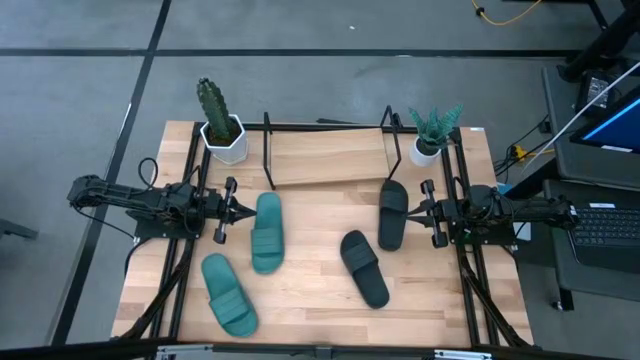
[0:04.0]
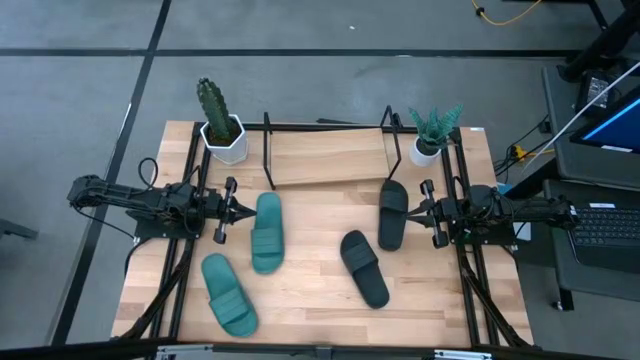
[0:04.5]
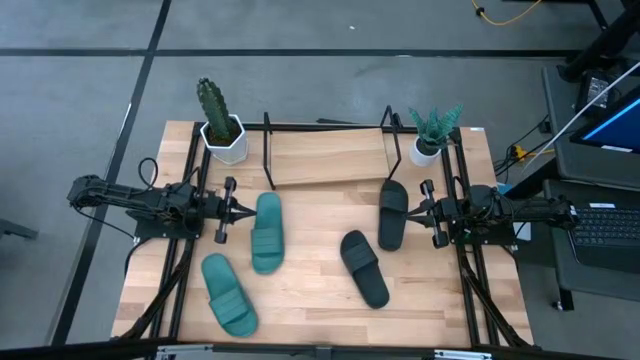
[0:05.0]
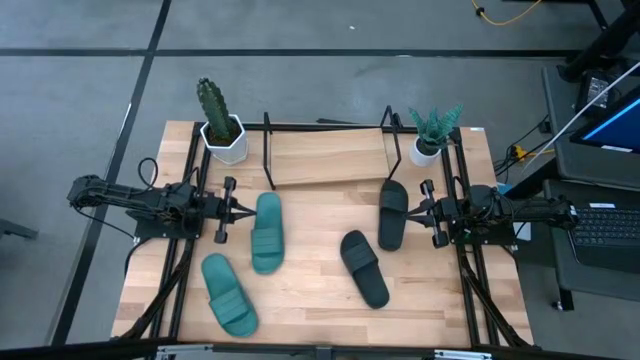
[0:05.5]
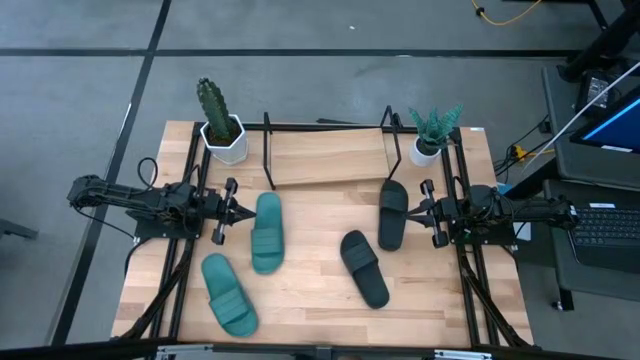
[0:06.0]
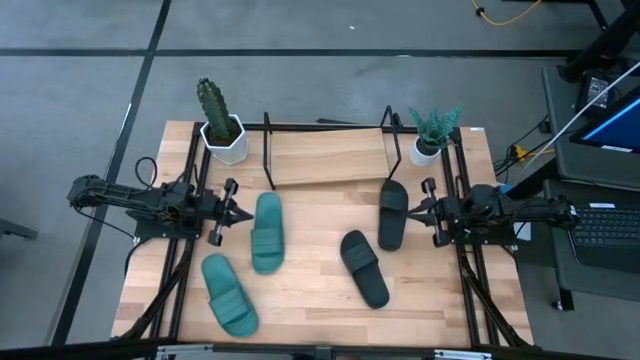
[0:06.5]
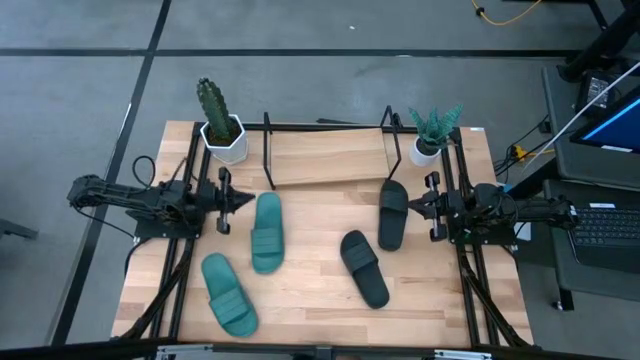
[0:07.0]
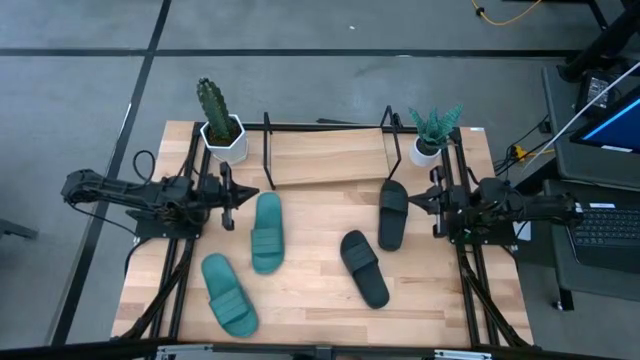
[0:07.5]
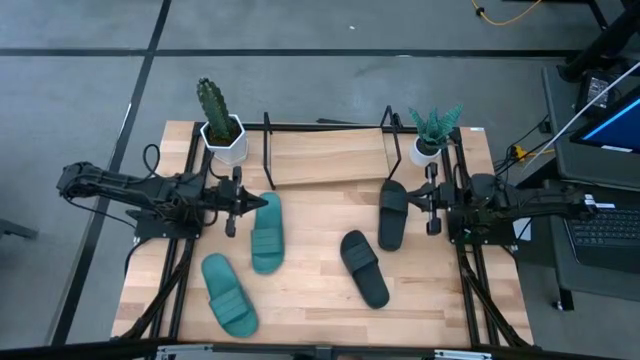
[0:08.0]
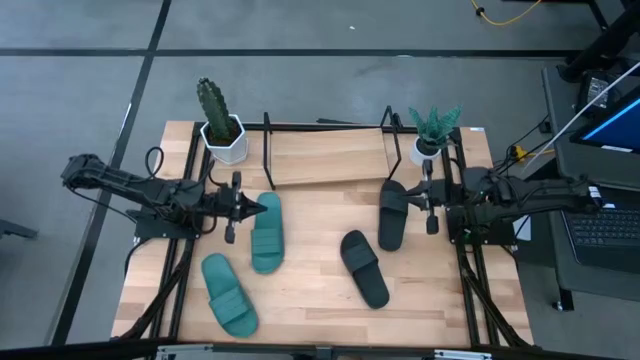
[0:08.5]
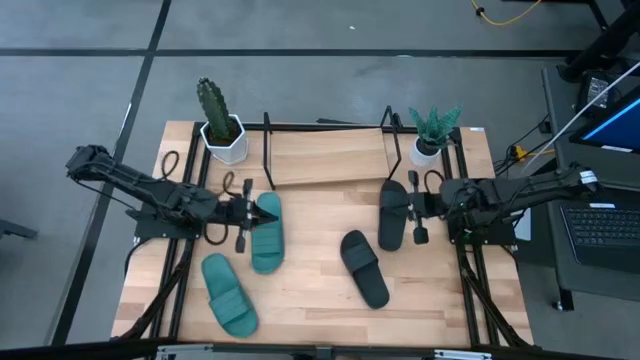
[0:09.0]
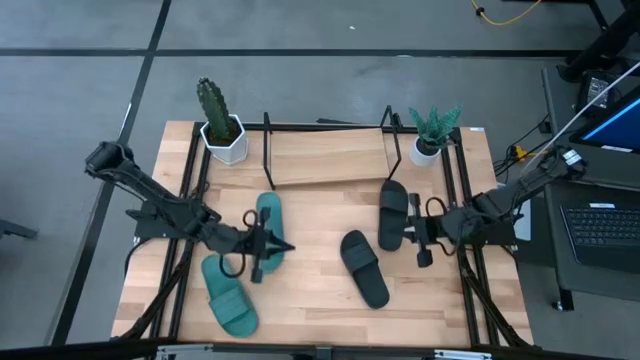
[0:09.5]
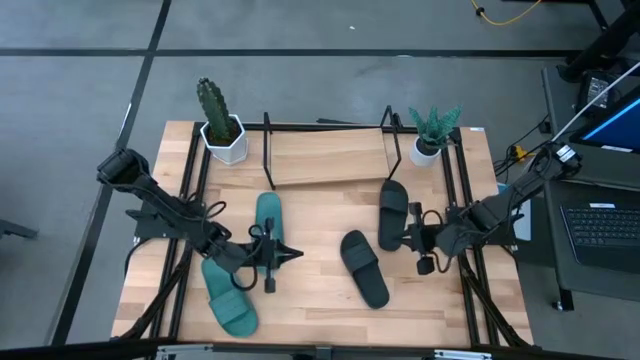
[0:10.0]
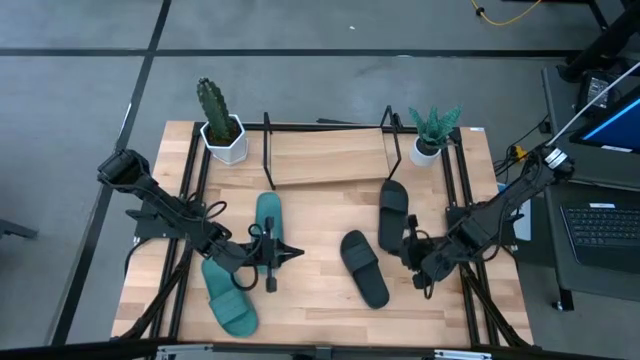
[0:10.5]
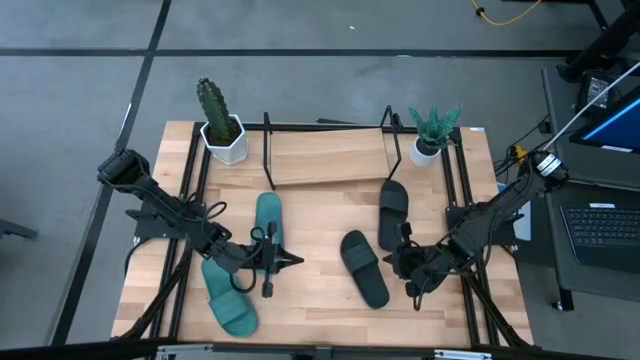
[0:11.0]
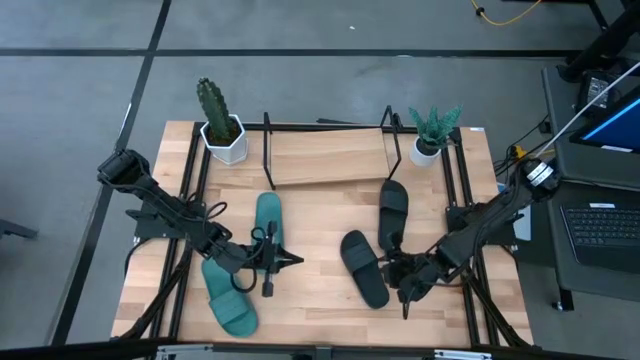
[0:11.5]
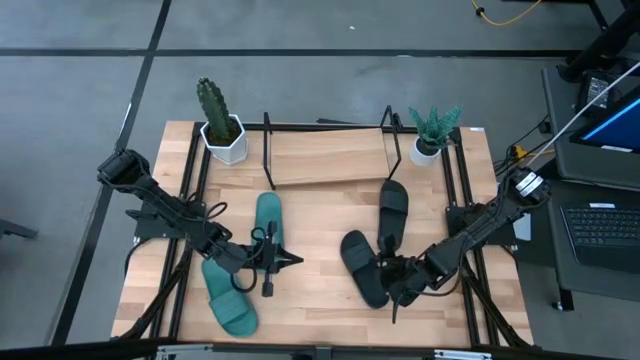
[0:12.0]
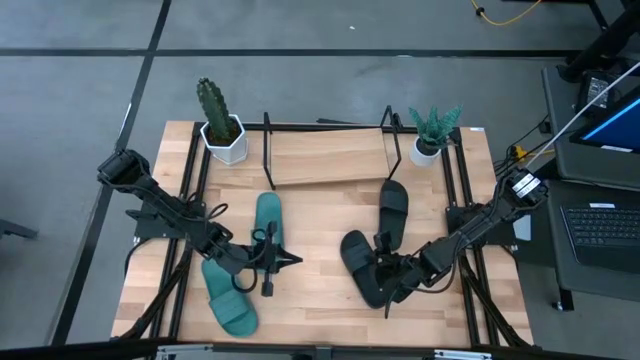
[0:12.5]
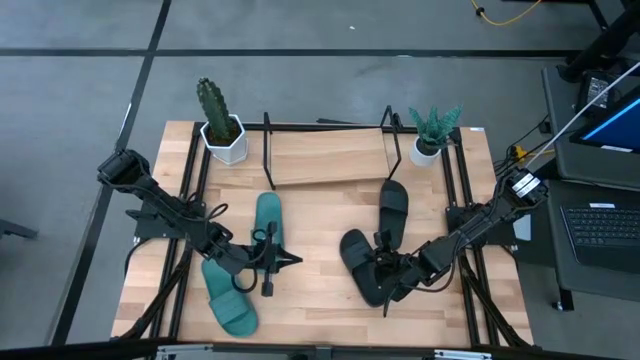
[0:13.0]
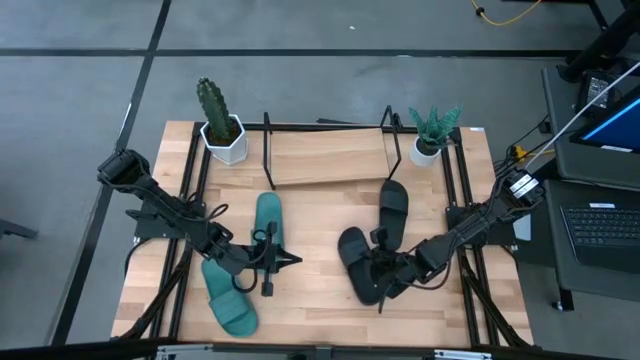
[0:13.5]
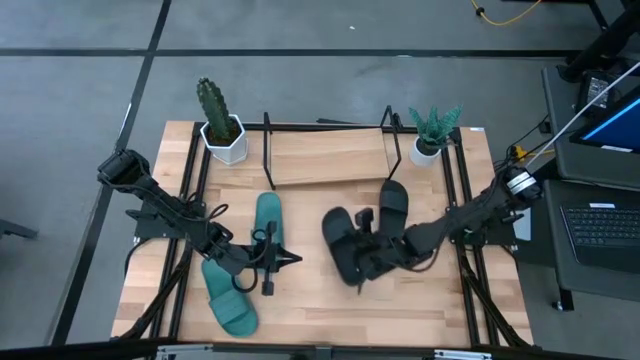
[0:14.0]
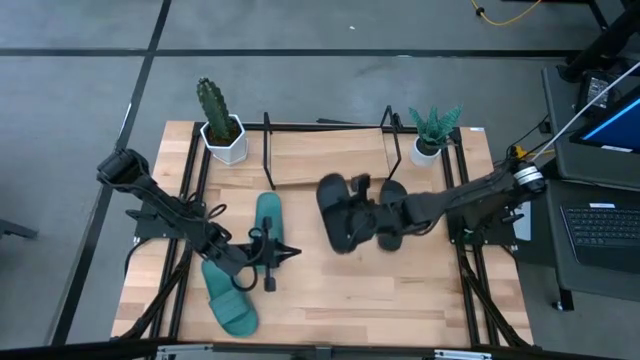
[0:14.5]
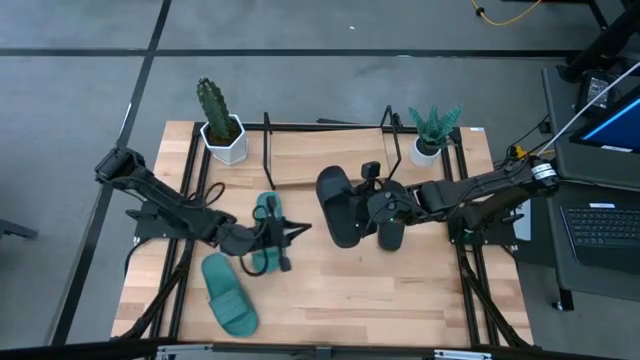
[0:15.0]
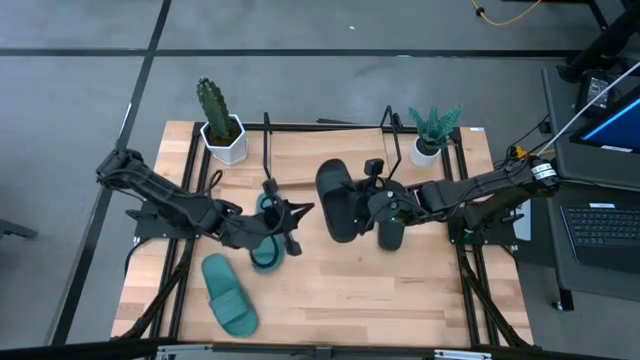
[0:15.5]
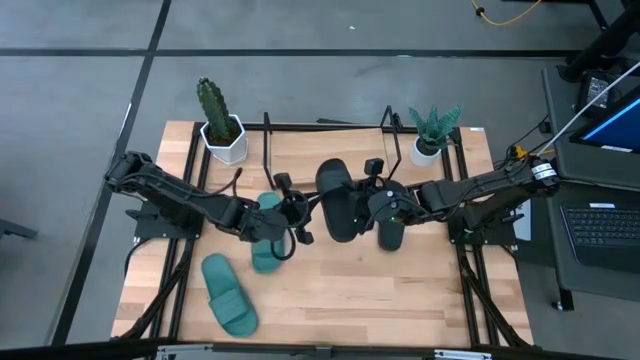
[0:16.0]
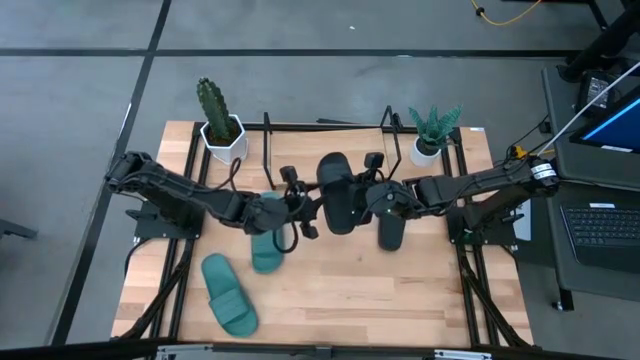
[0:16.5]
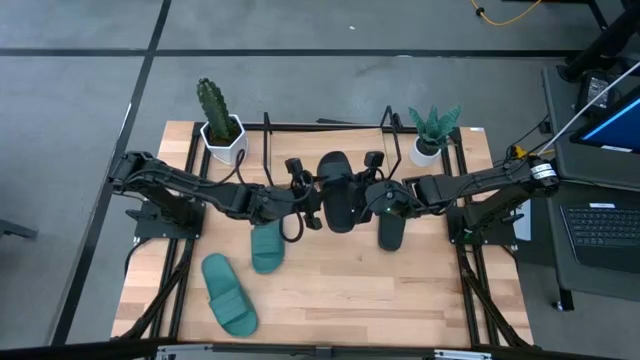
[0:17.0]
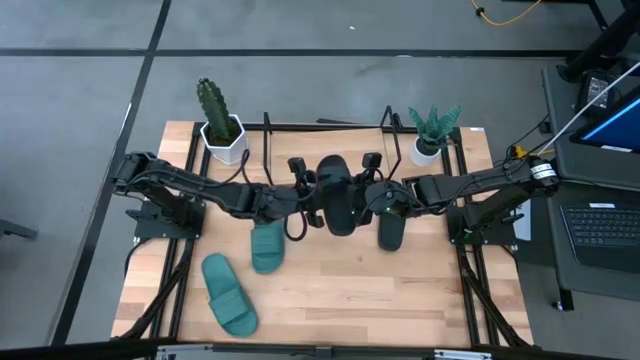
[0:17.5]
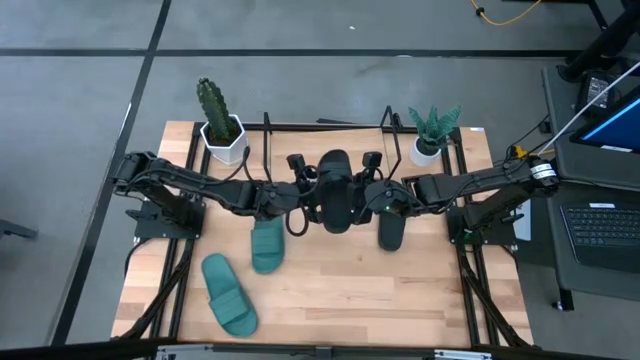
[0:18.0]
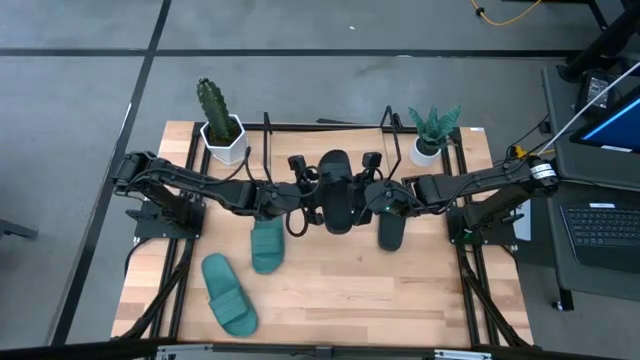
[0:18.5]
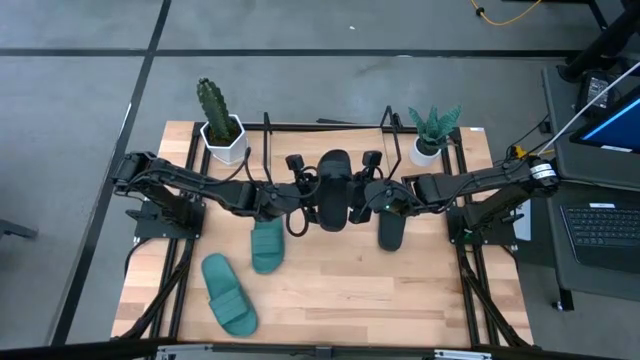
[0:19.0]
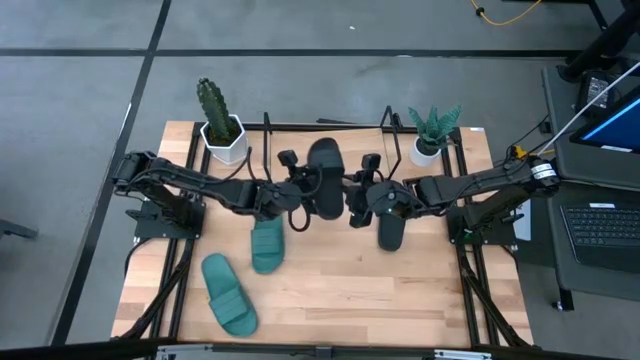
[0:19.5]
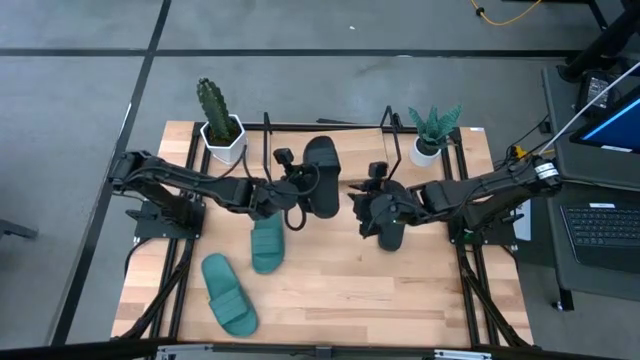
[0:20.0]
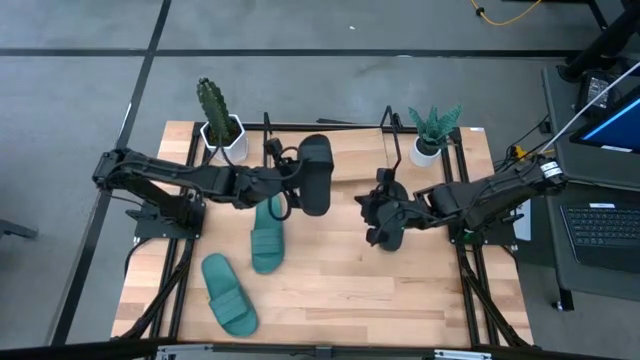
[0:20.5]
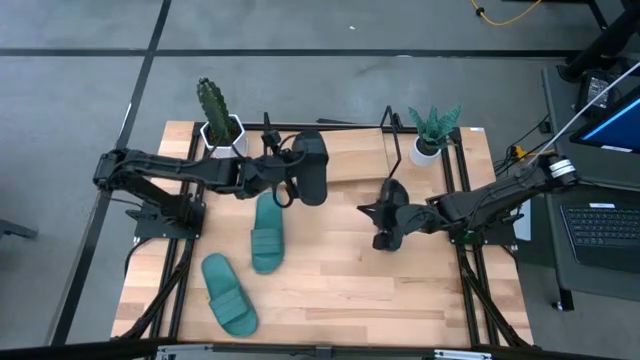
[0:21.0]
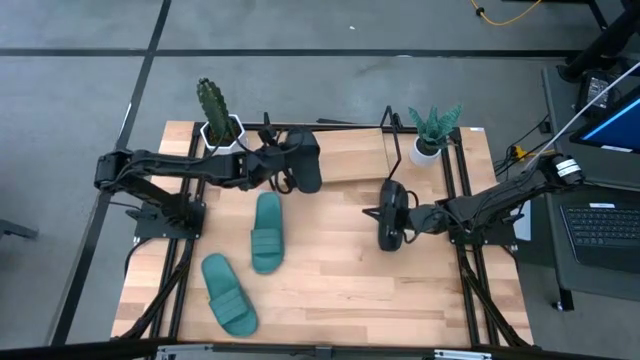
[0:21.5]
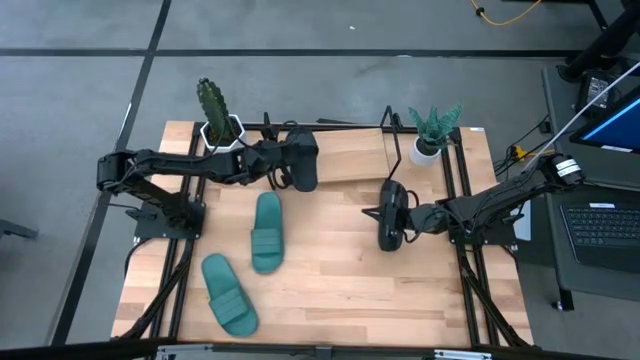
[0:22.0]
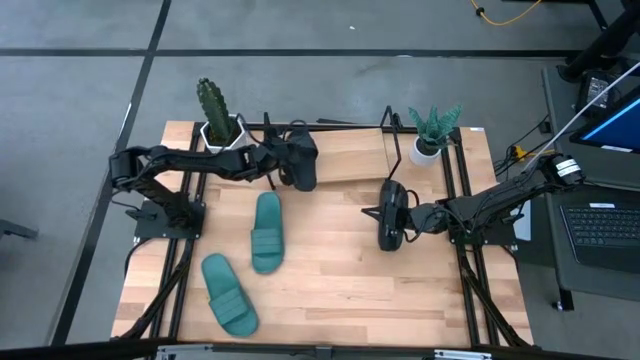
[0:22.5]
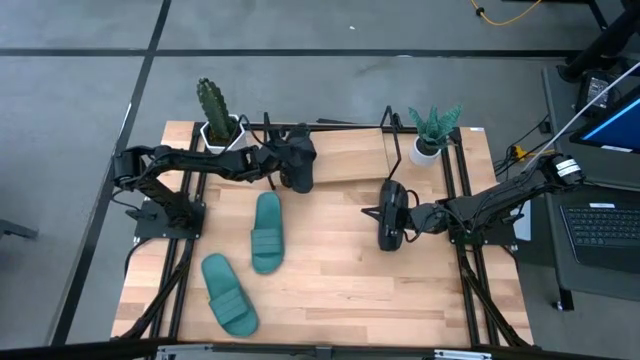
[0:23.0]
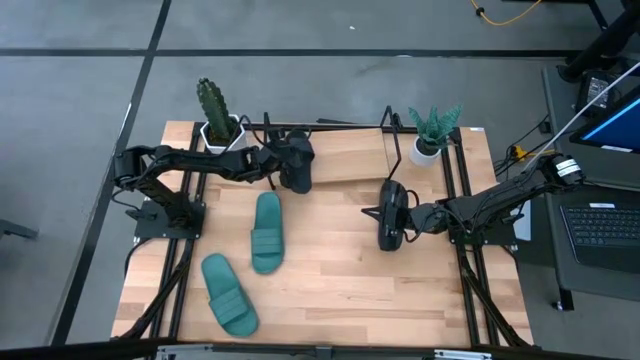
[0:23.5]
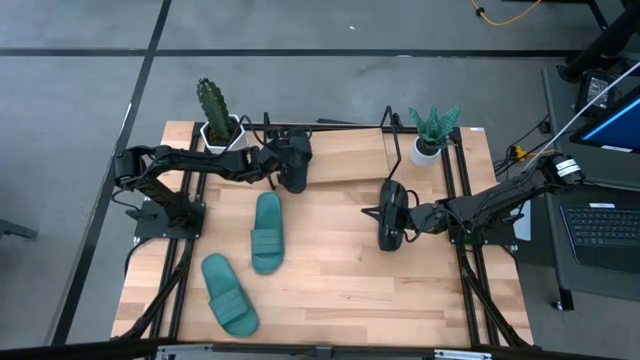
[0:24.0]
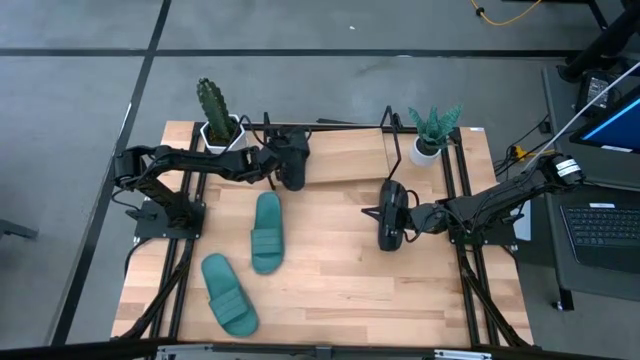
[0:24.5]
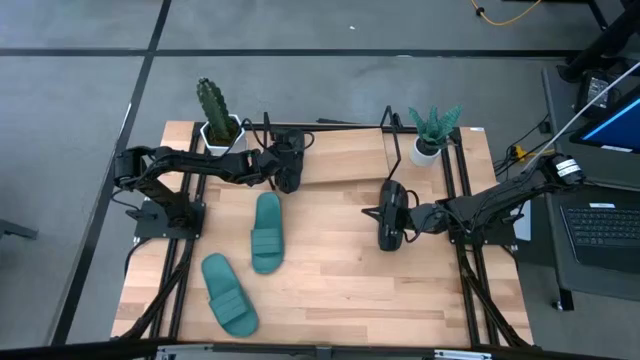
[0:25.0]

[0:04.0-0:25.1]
Task: Pick and place slides into the shelf
Put the left black slide on the shelf
